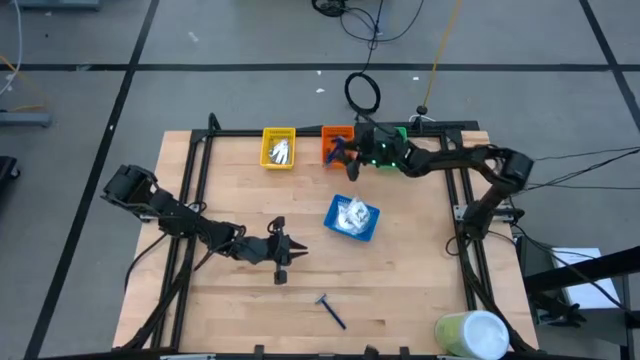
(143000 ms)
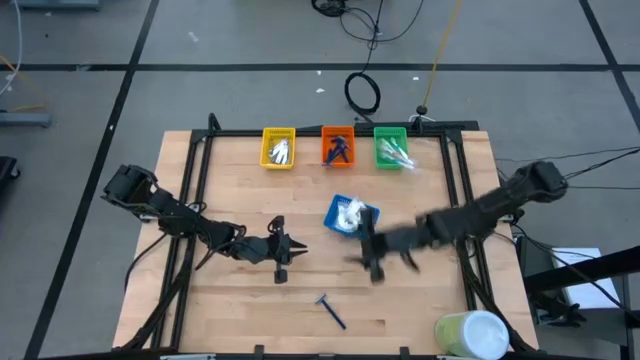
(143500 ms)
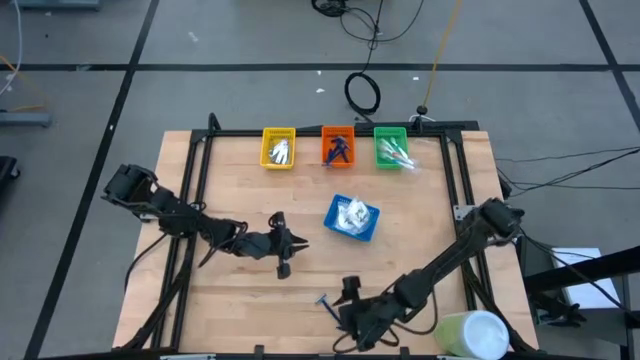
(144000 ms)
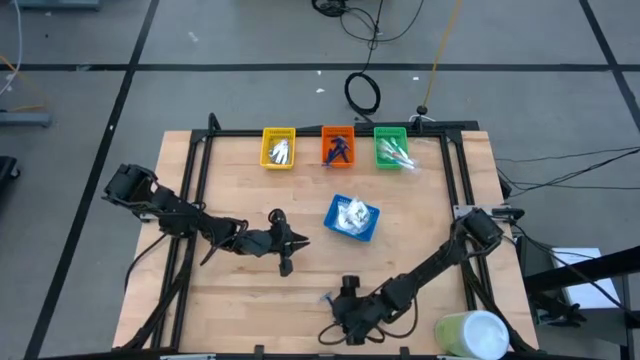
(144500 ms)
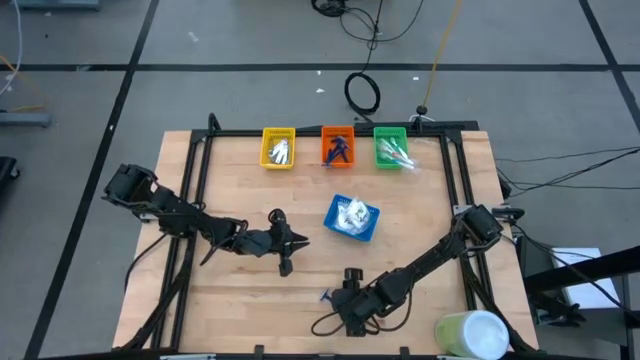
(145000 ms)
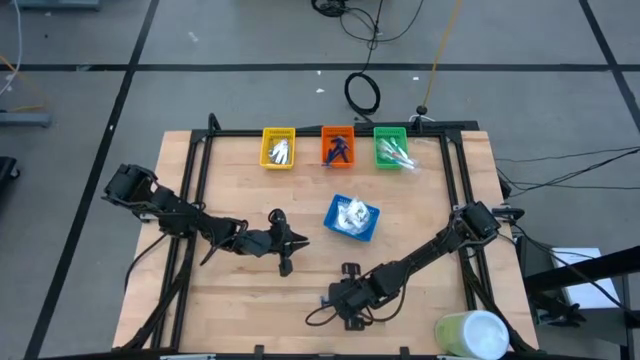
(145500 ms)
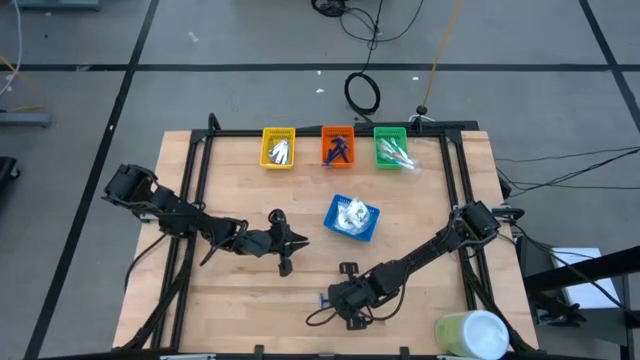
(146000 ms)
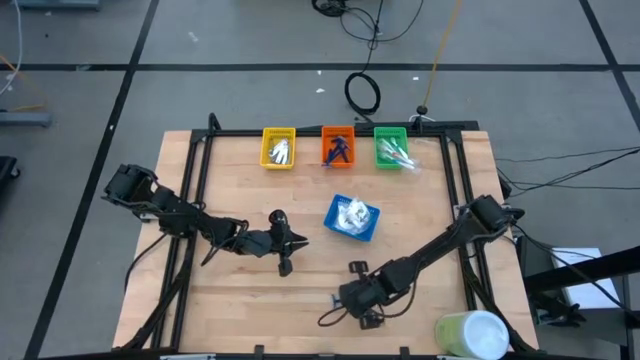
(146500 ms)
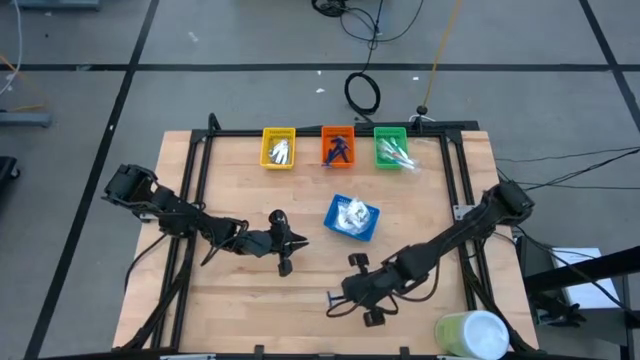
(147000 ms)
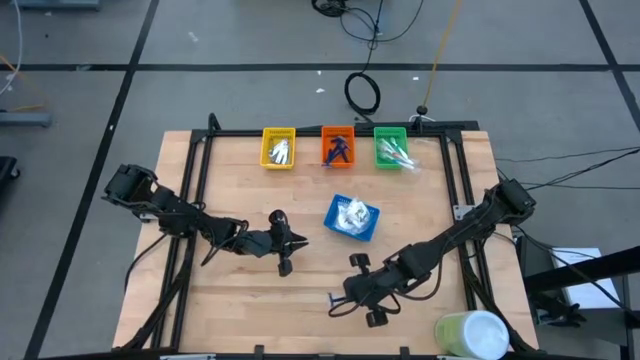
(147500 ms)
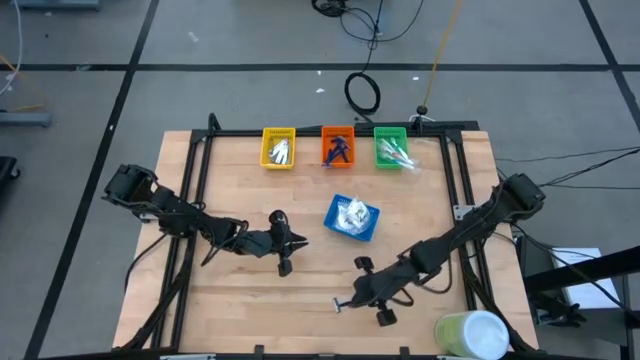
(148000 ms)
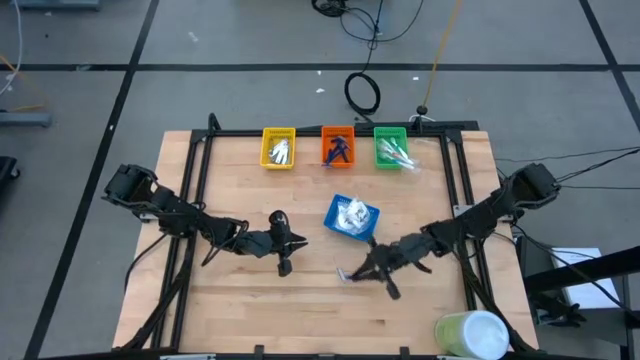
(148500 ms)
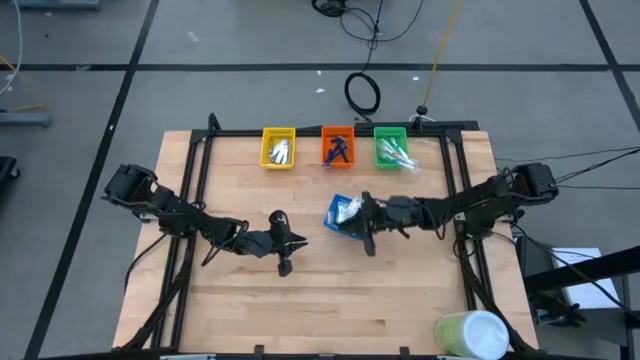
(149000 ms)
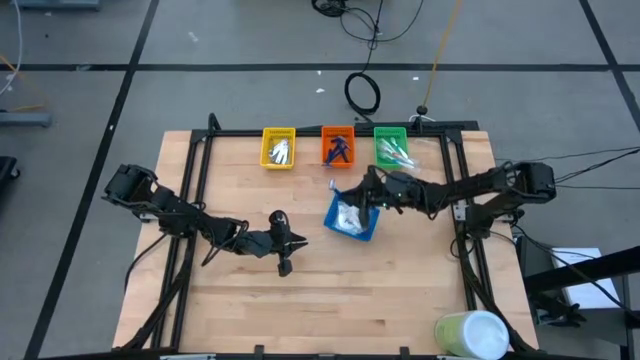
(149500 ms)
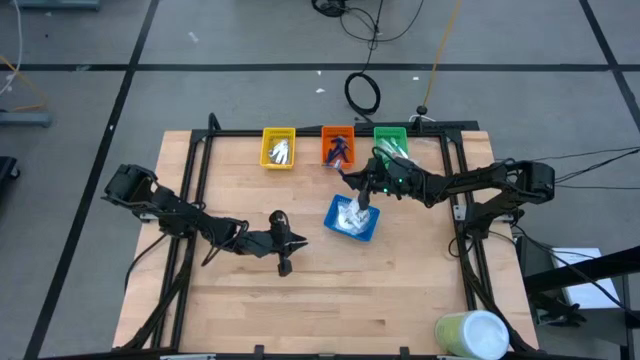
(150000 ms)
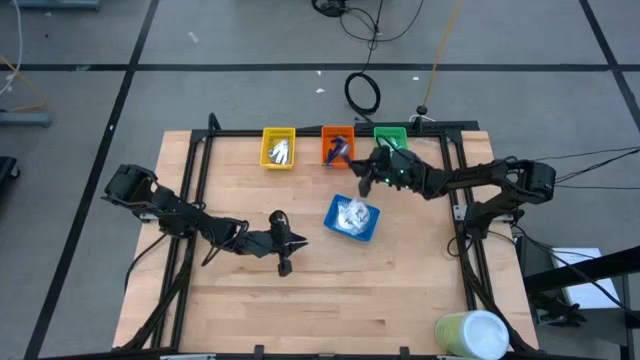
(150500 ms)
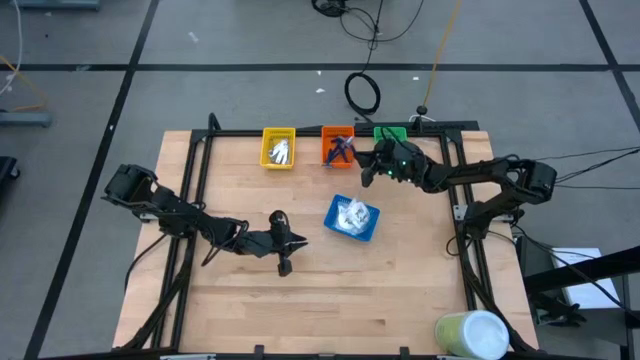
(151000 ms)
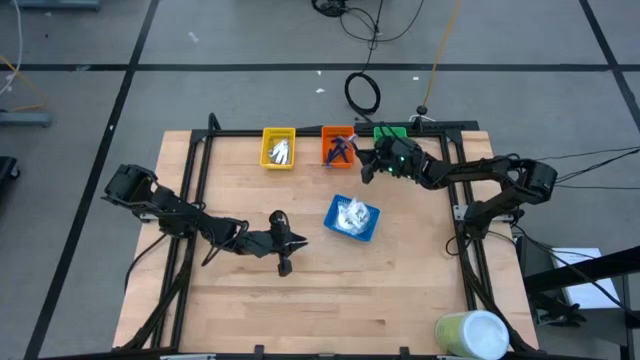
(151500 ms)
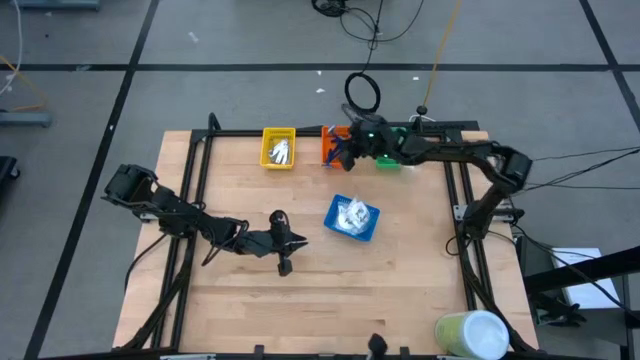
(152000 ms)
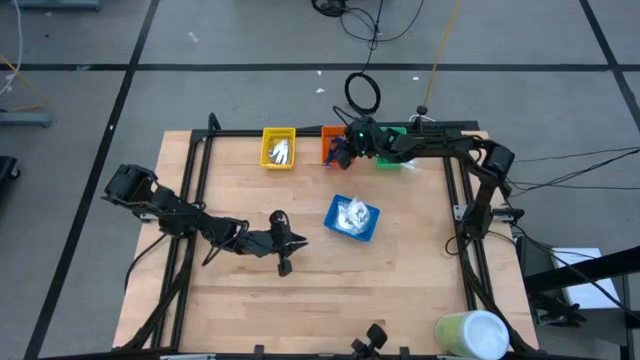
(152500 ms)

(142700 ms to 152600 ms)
Task: Pick & Place Travel size toiletries
Put the blue razor into the orange basket

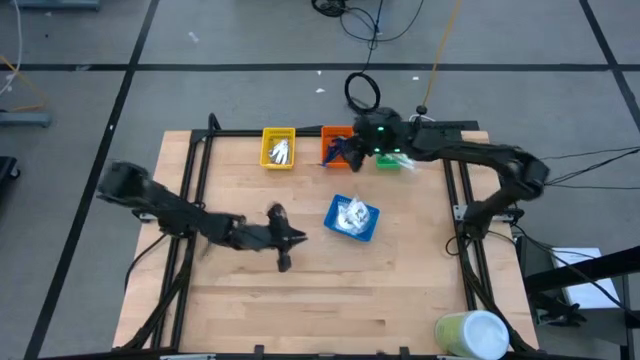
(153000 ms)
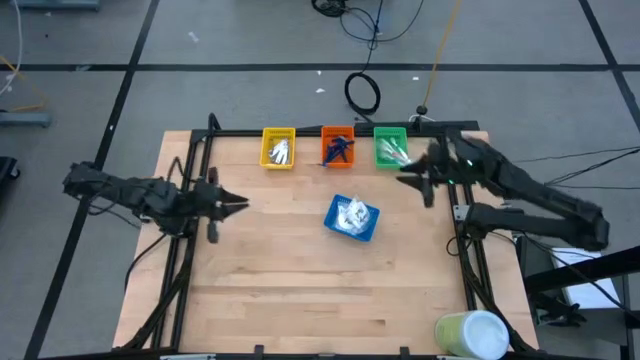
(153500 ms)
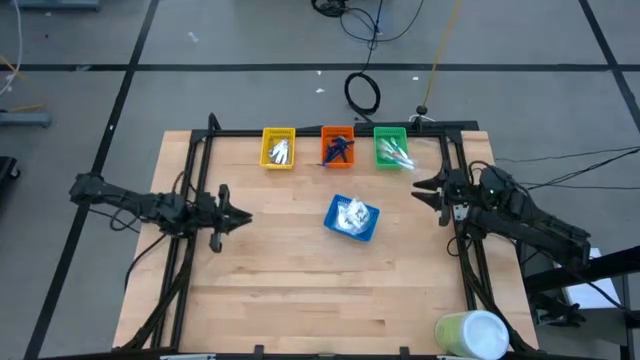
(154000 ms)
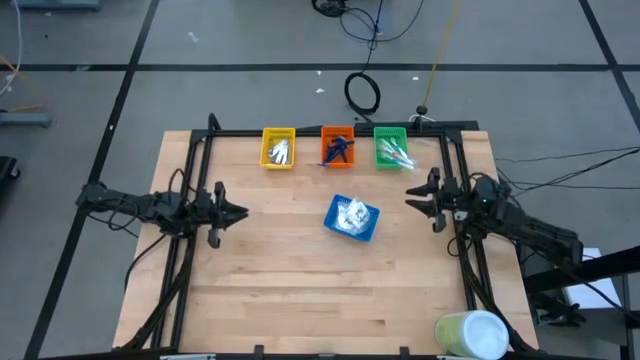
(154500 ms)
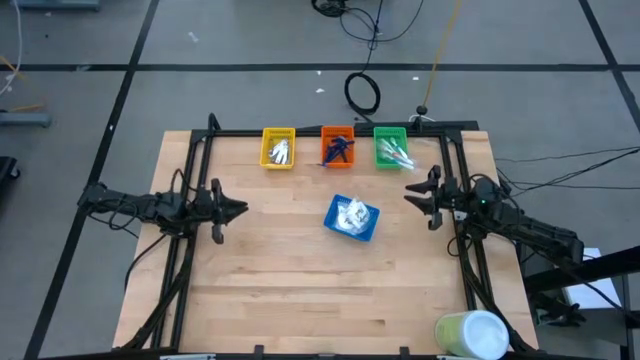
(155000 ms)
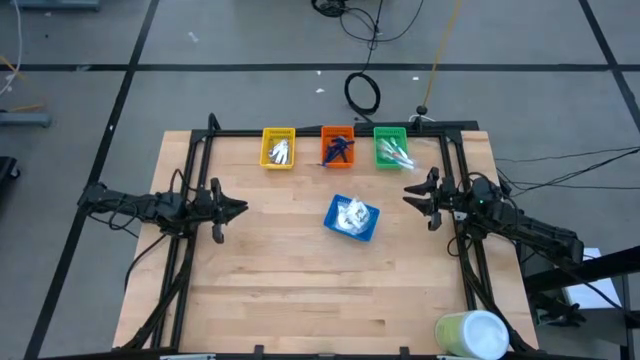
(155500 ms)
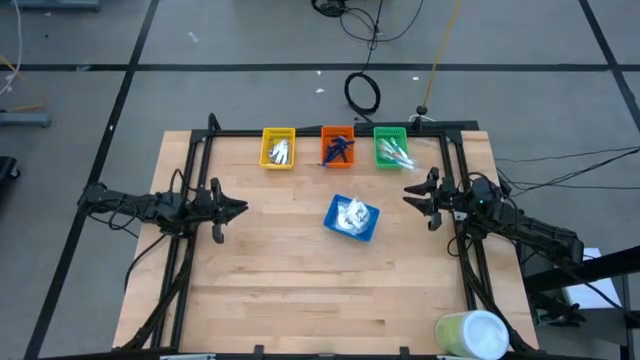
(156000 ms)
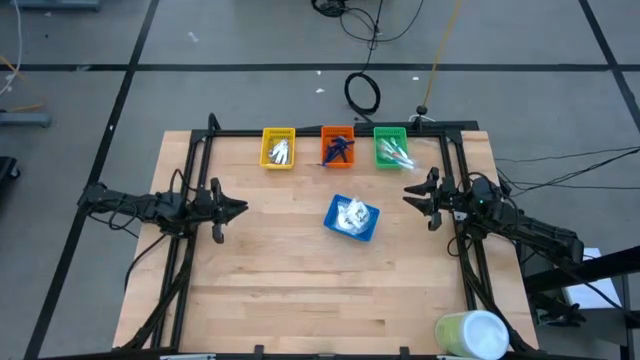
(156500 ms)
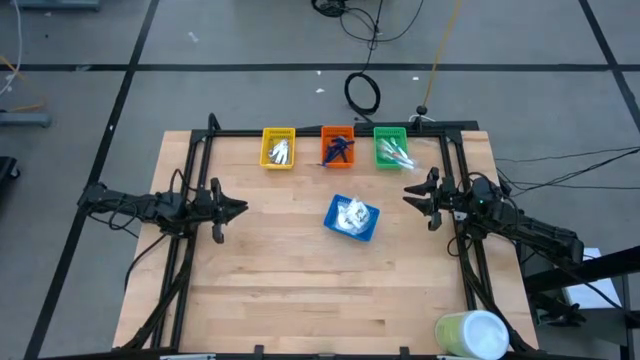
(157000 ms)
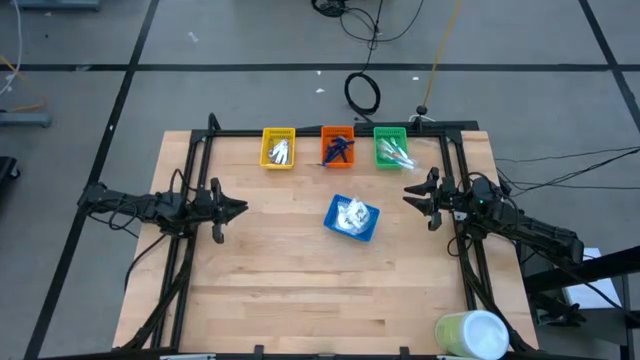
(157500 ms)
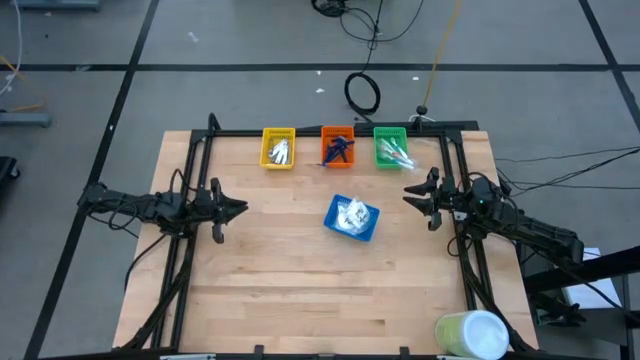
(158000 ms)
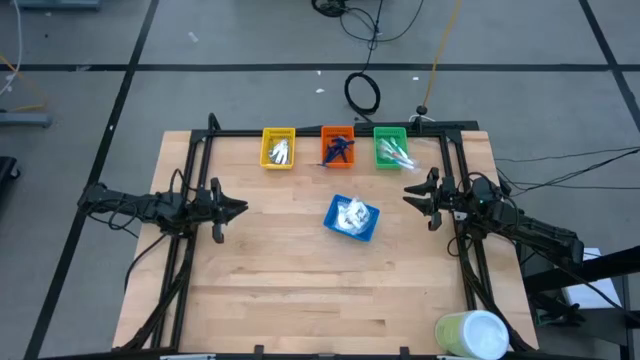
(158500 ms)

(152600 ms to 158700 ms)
Return to Home Position

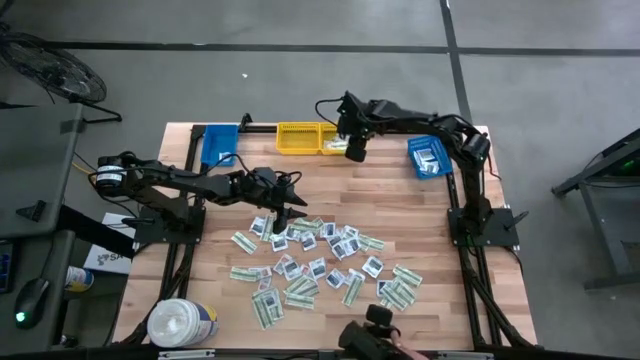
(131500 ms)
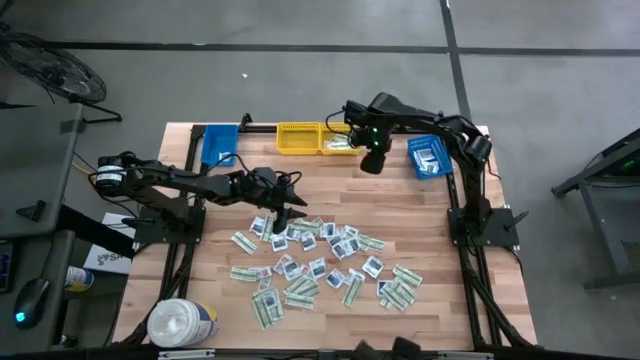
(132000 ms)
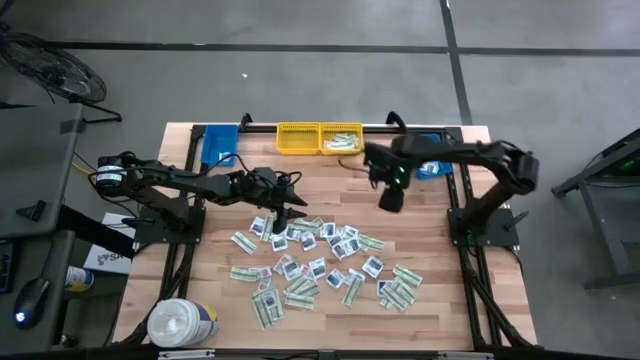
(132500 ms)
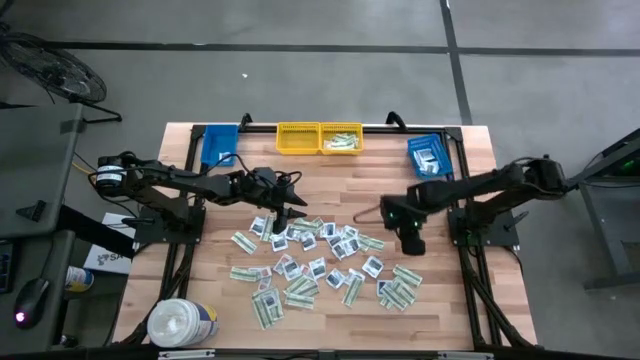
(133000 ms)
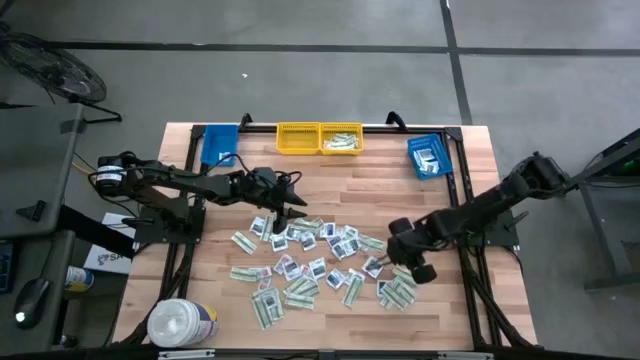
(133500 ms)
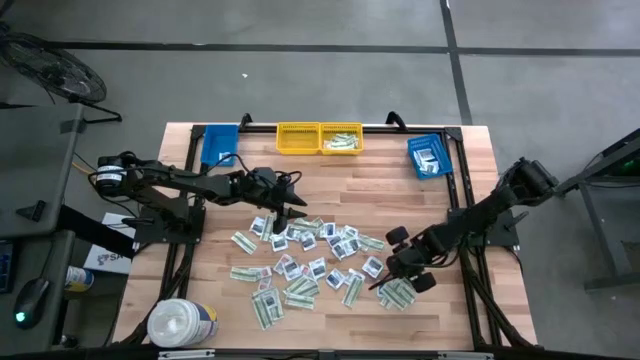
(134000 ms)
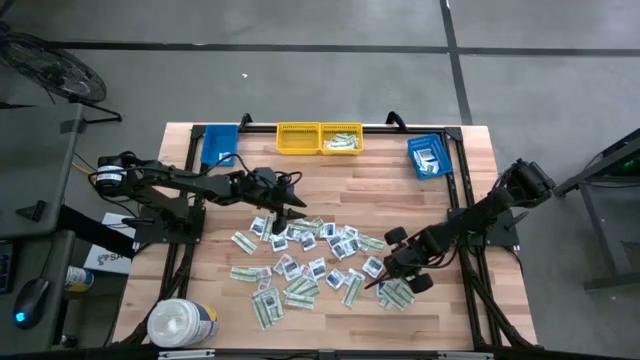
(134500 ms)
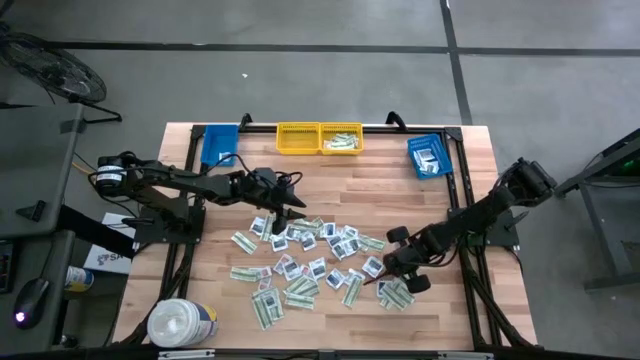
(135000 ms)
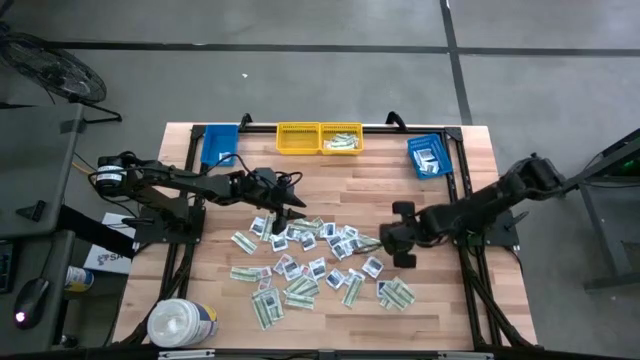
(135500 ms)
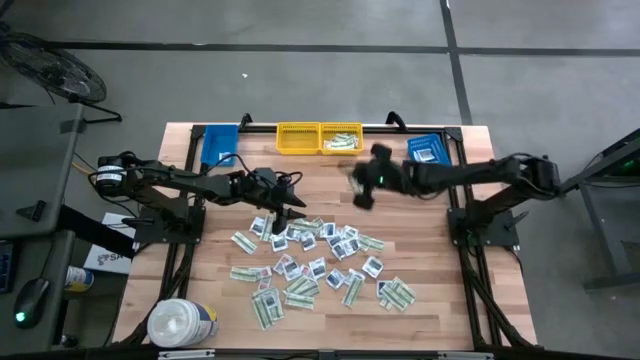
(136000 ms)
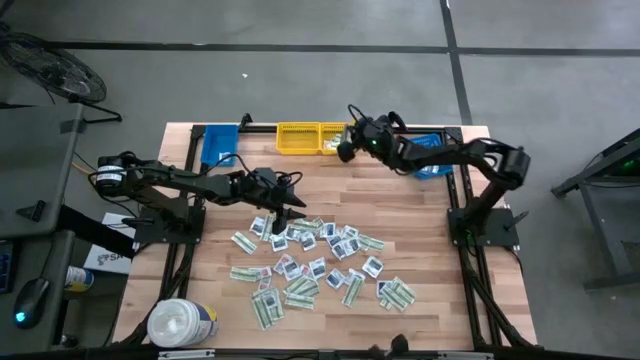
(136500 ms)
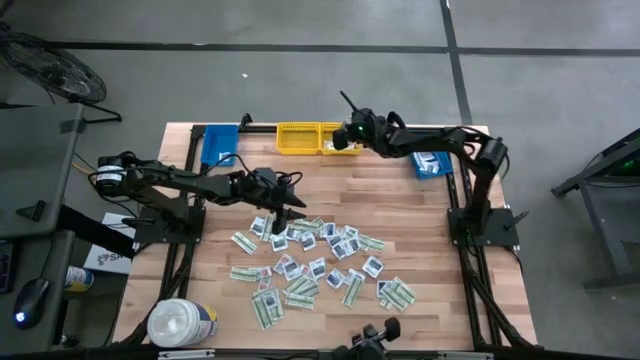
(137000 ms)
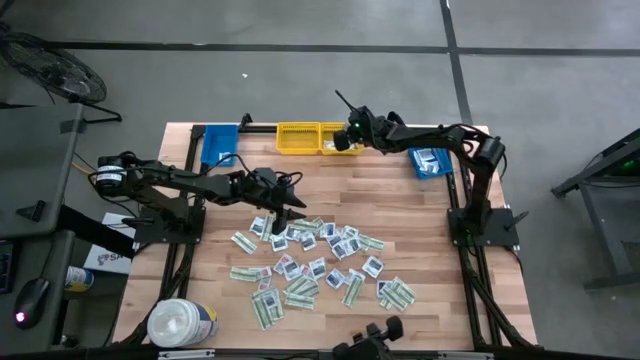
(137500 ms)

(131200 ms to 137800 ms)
Task: Pick & Place First Aid Supplies
Put the green bandage pack into the right yellow bin
